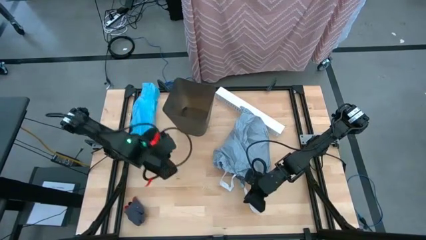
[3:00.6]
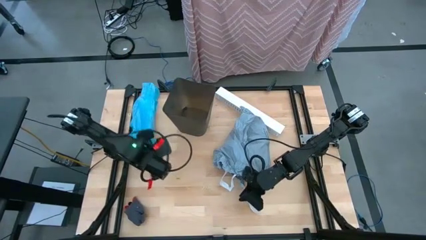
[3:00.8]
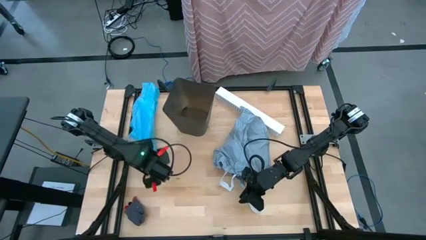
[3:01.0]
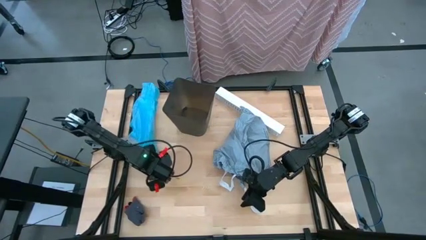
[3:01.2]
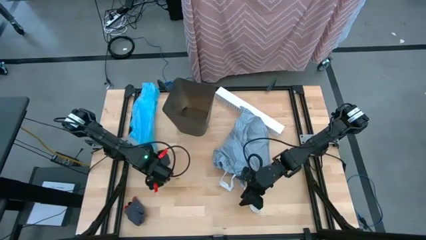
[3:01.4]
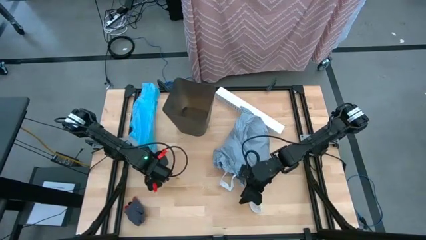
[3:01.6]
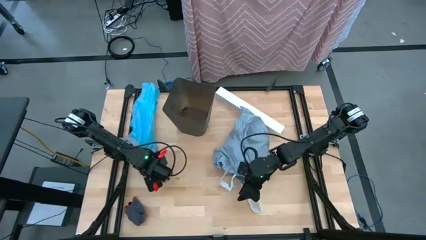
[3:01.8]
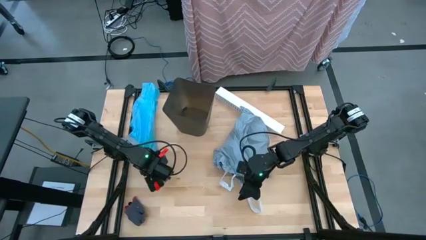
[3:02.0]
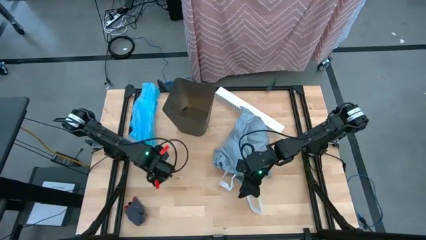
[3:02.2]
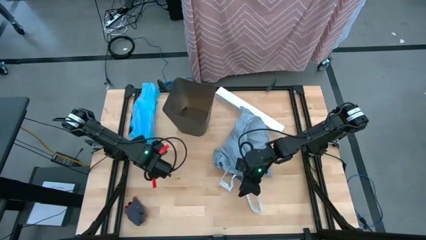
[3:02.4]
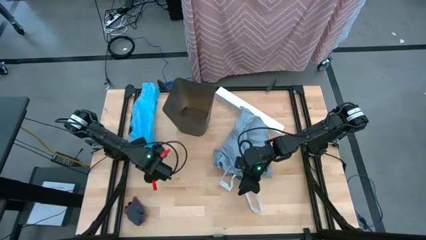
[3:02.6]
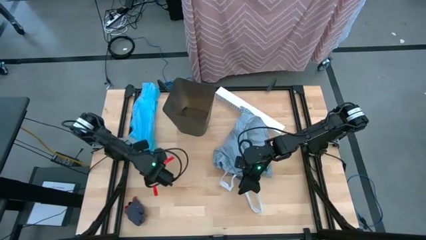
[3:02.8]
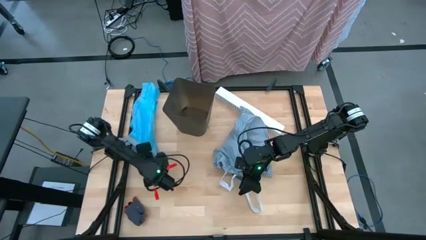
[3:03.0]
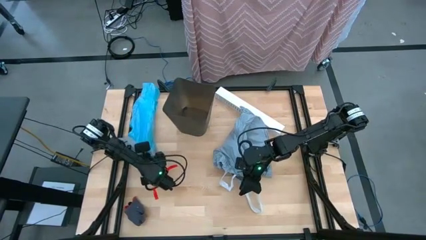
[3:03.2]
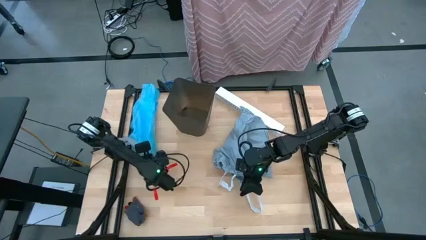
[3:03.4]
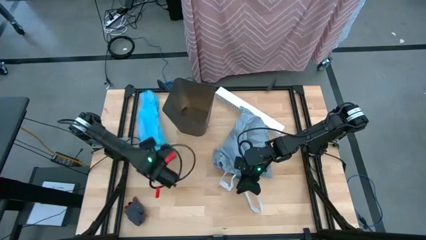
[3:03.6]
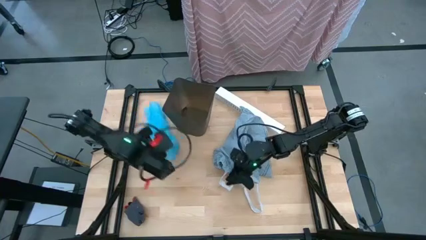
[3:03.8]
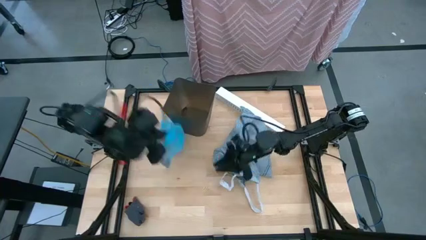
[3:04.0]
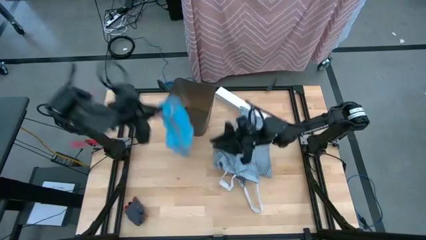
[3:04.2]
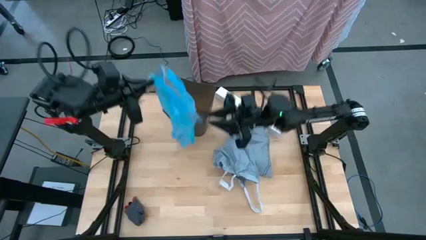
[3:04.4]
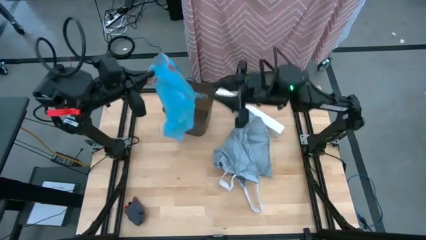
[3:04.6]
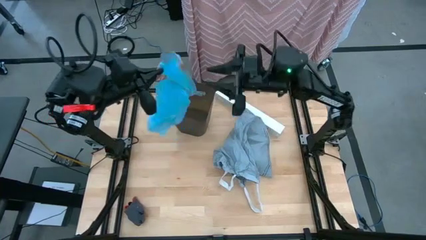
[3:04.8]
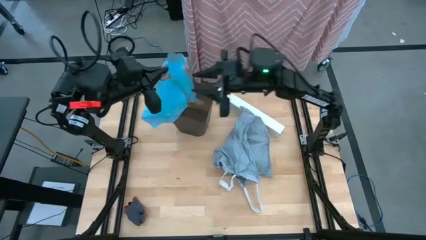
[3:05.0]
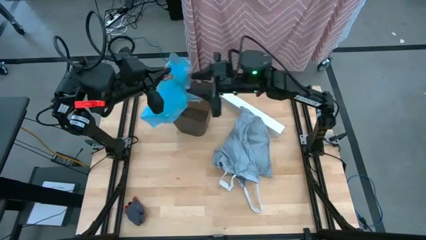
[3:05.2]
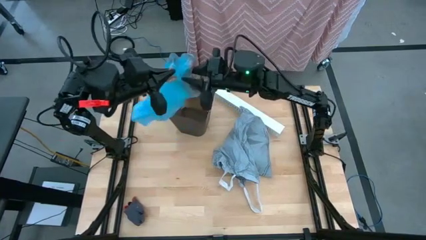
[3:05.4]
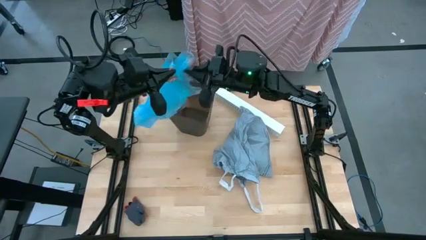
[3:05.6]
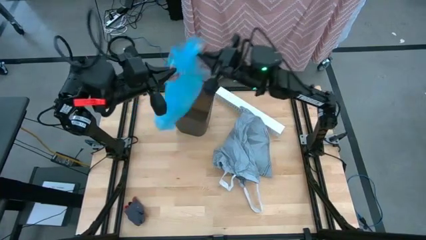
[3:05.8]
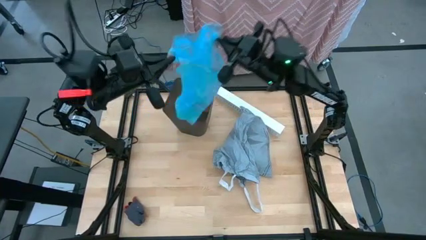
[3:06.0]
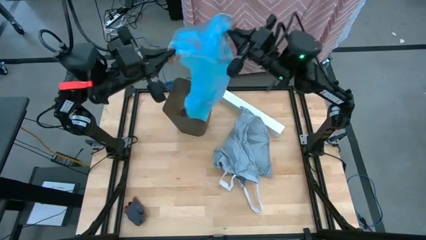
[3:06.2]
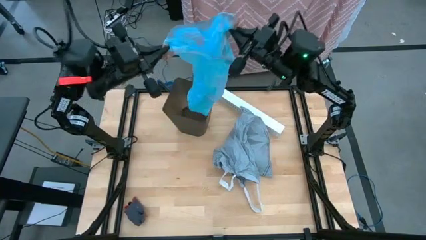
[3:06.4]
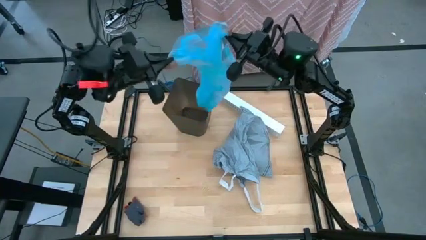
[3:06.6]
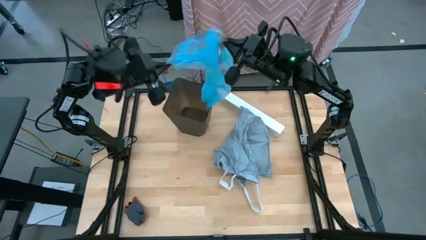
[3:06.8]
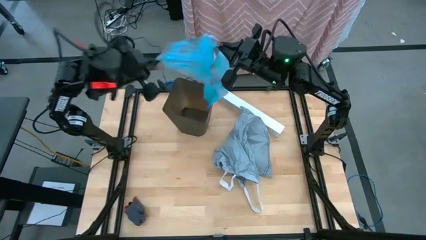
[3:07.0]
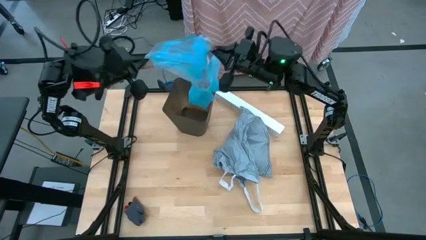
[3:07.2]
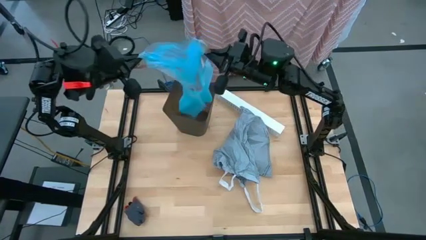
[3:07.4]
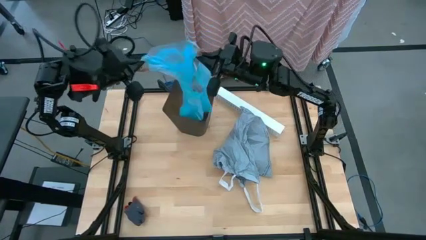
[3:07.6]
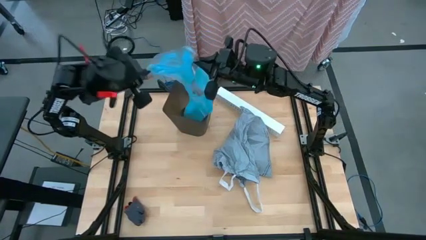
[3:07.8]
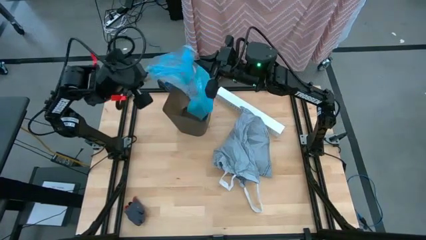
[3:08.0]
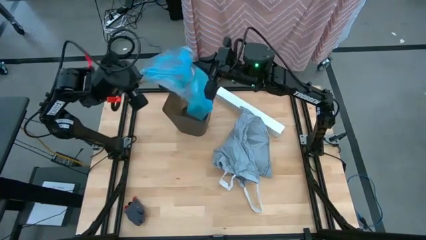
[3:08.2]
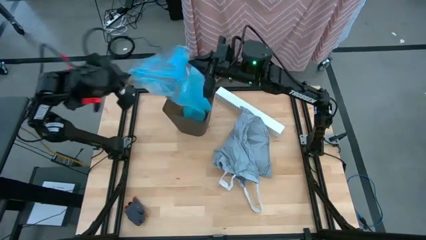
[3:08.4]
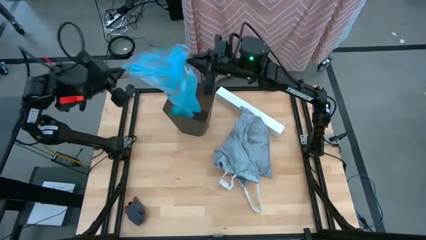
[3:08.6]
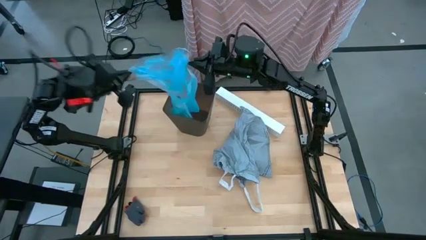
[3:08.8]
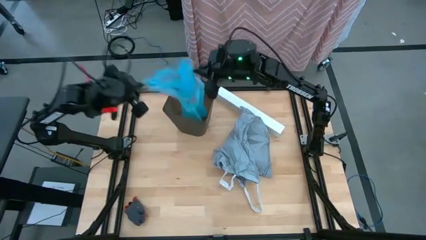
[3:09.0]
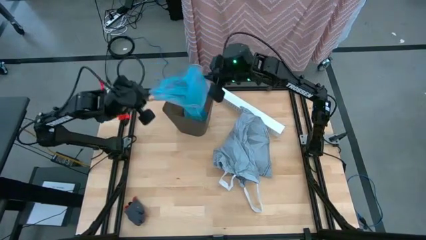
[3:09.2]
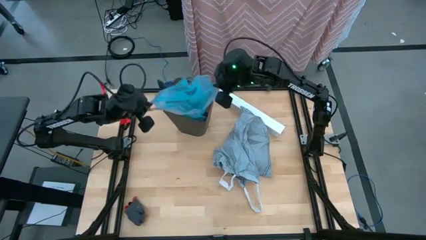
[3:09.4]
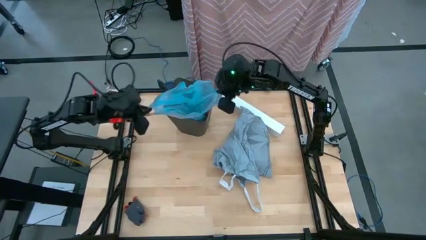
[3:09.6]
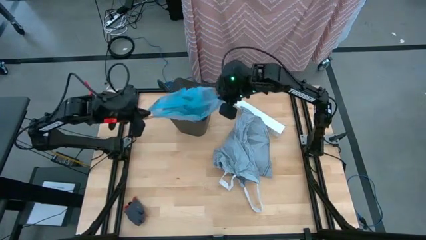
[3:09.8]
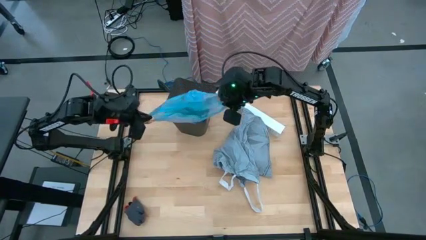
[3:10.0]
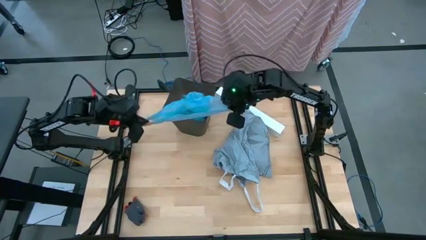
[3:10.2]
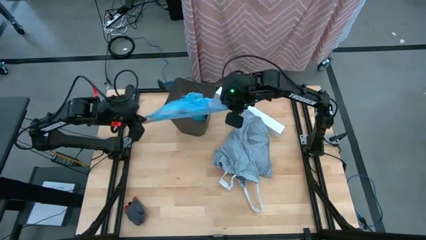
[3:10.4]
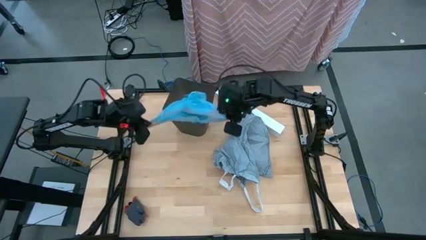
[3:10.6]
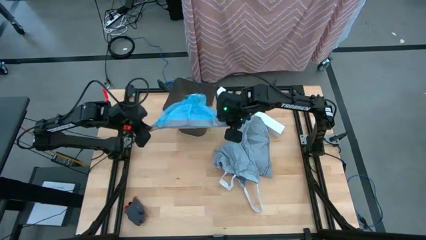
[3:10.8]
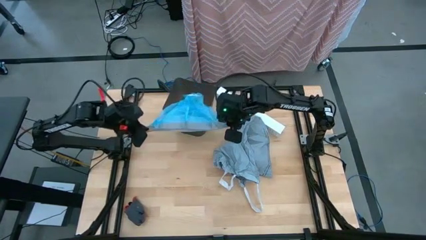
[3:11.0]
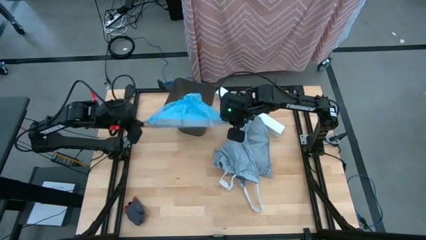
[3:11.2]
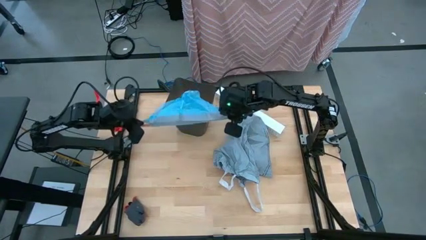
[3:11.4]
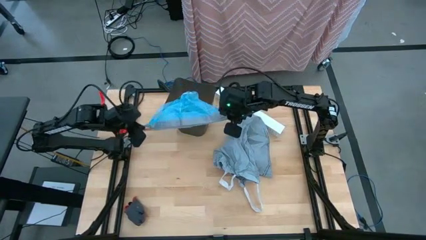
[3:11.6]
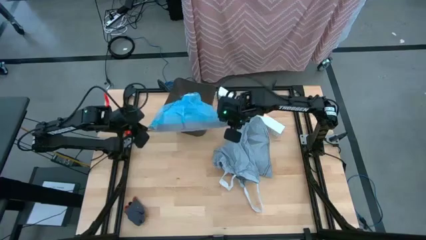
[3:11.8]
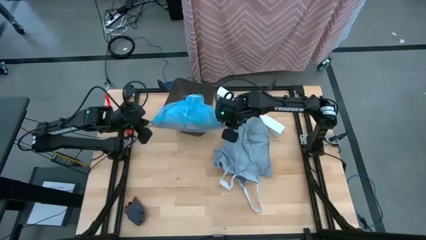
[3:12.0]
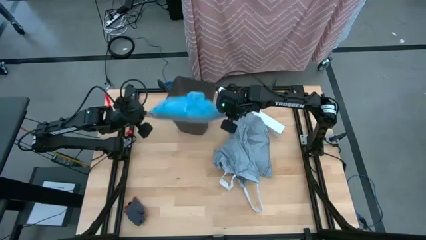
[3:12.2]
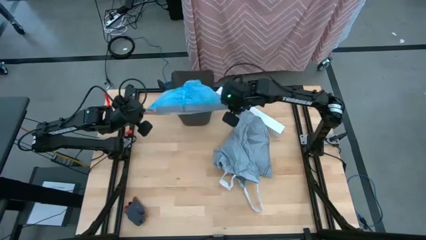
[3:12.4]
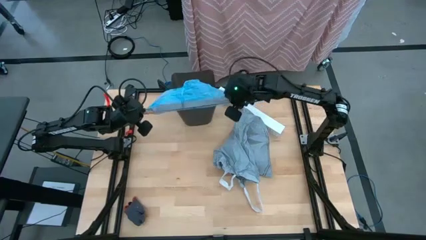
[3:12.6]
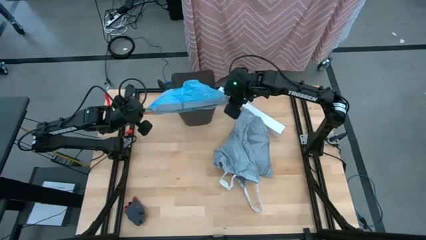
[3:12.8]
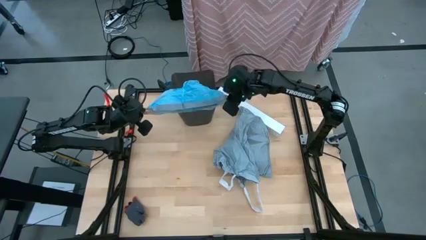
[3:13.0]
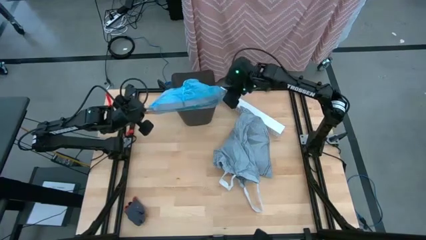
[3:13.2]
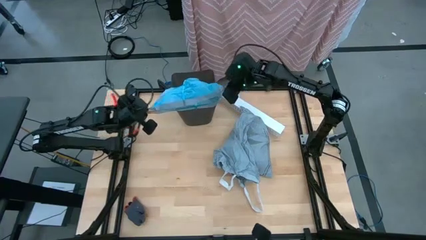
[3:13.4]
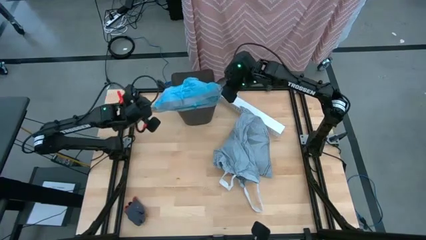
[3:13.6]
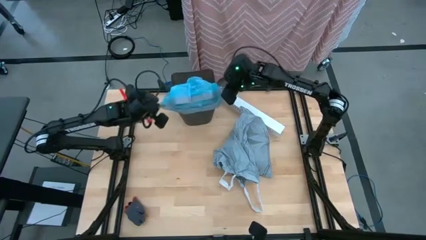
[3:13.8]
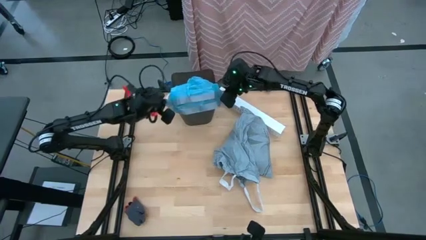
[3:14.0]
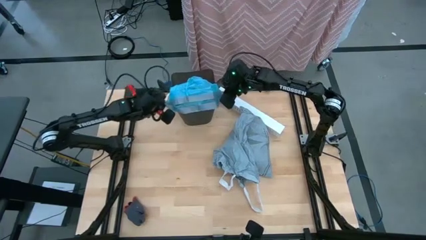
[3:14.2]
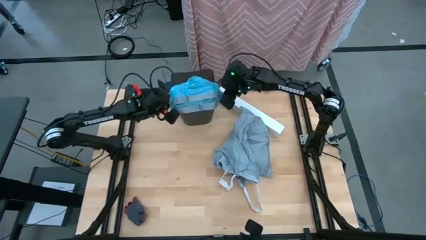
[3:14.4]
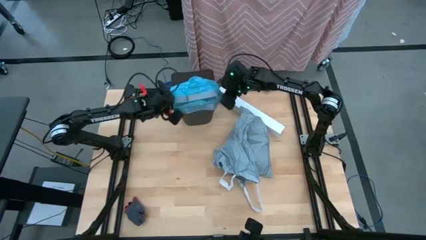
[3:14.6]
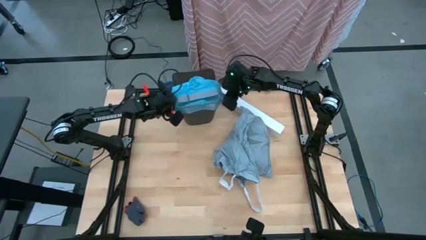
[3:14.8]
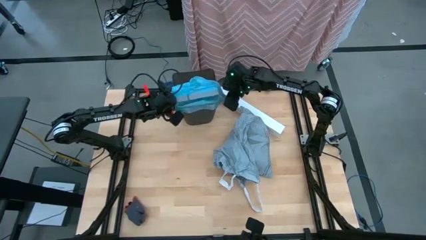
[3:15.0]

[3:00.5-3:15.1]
Task: place trash/remove bag and relplace
Insert a new trash bag into the trash bin

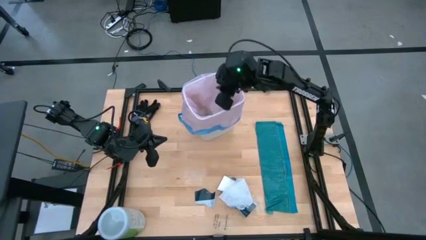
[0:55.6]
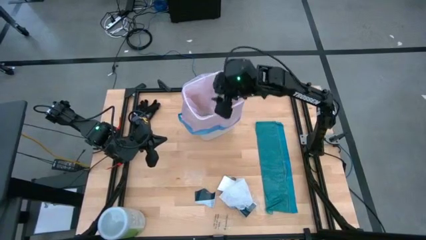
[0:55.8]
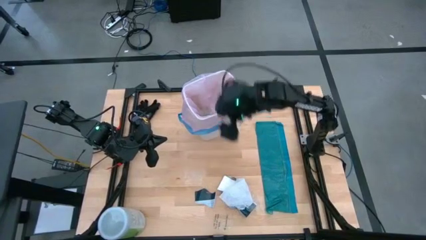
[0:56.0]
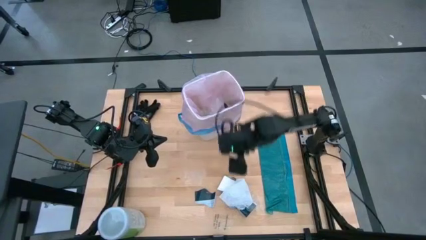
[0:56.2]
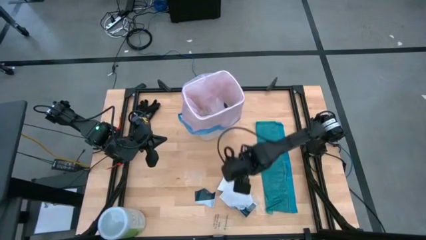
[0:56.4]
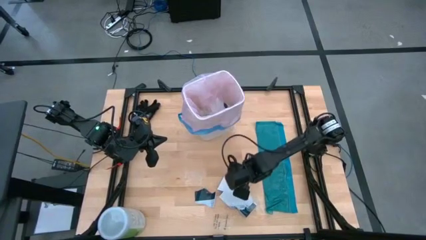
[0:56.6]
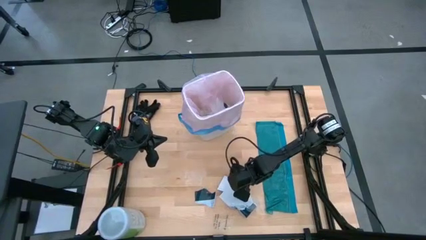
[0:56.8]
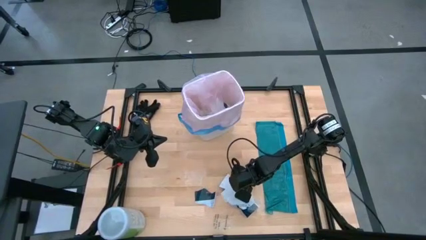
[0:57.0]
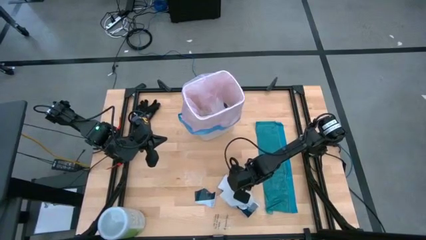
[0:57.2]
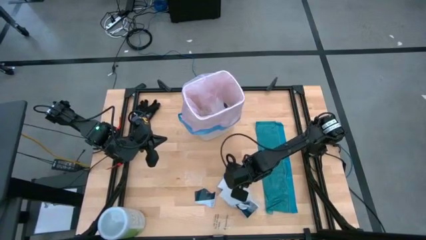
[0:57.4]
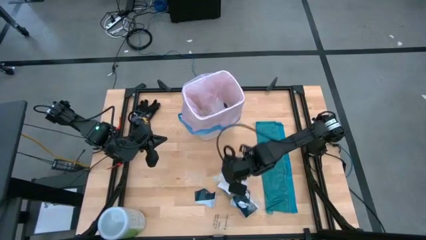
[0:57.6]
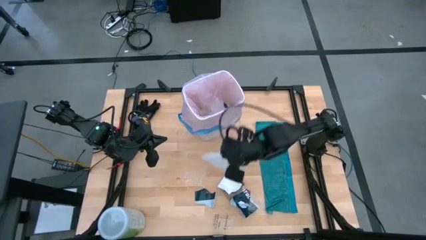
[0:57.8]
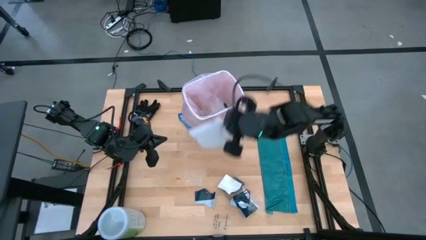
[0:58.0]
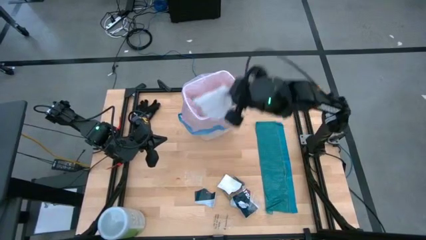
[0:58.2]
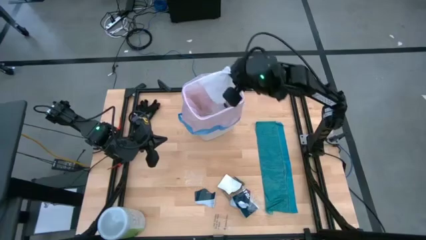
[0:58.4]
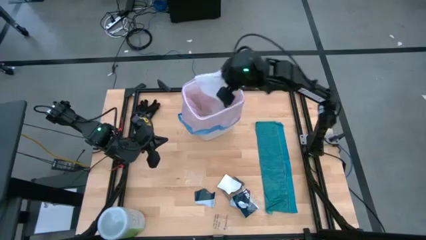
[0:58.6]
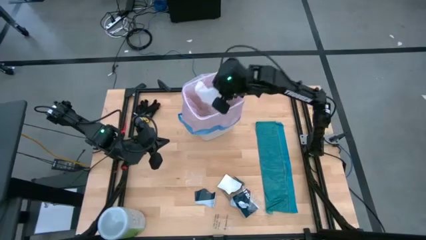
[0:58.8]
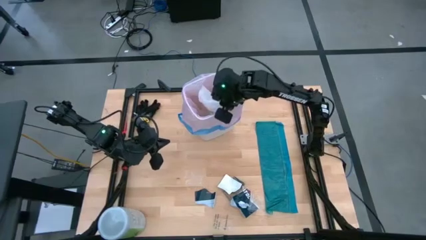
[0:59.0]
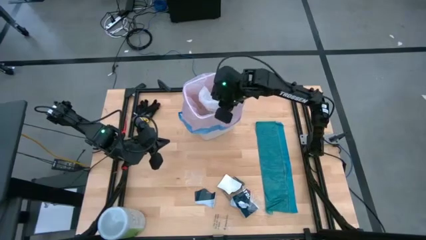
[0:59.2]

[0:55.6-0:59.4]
Task: place trash/remove bag and relplace
Put the white tissue paper into the white trash bin
